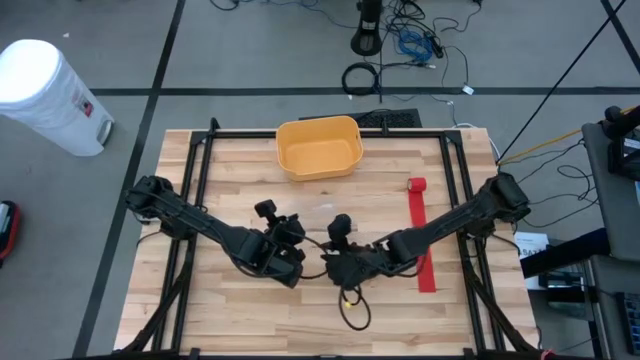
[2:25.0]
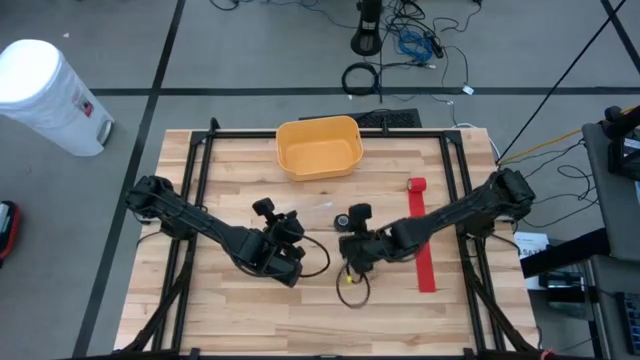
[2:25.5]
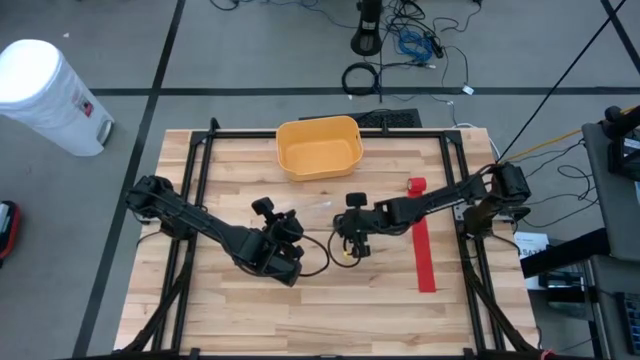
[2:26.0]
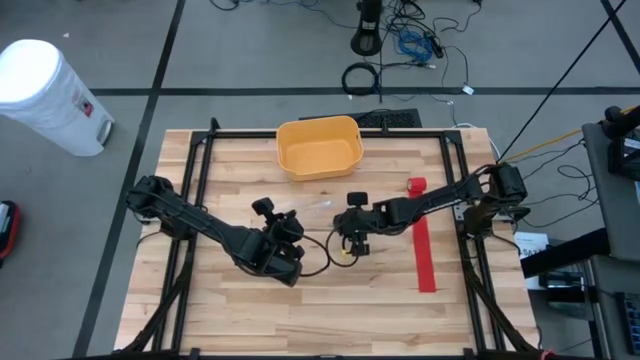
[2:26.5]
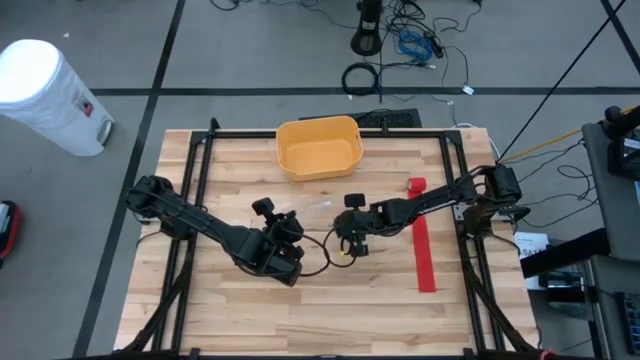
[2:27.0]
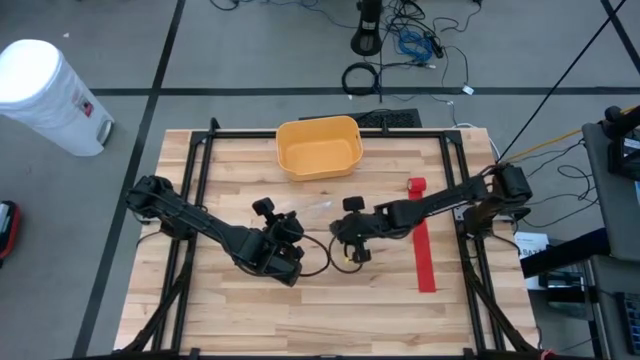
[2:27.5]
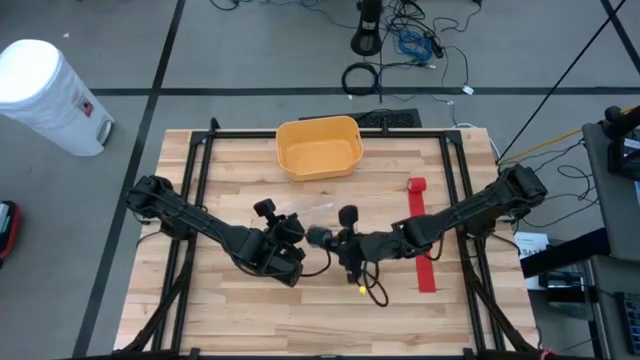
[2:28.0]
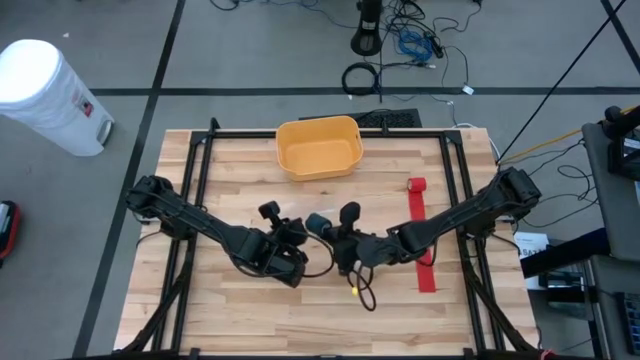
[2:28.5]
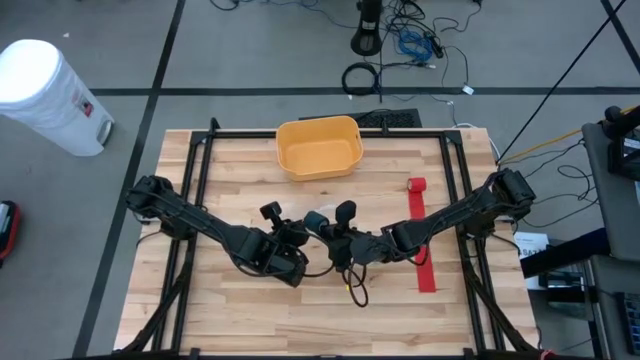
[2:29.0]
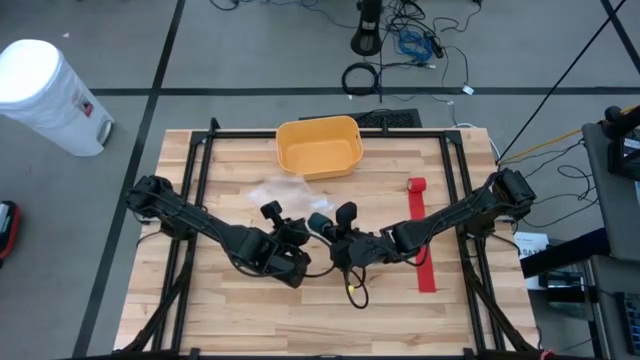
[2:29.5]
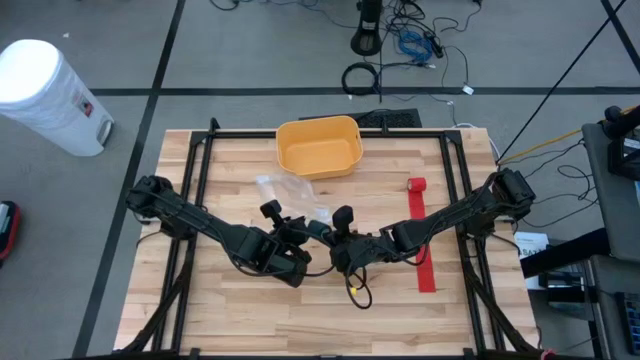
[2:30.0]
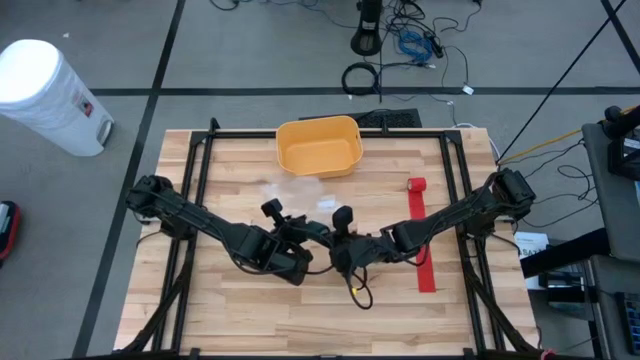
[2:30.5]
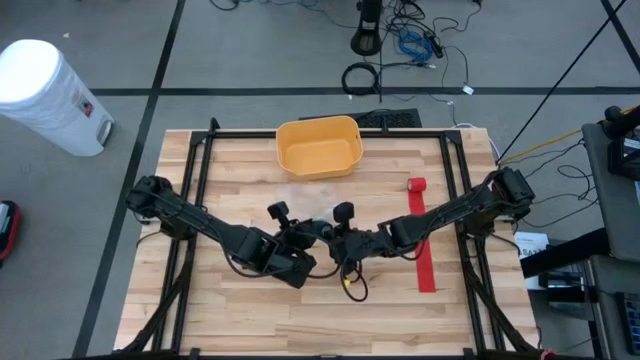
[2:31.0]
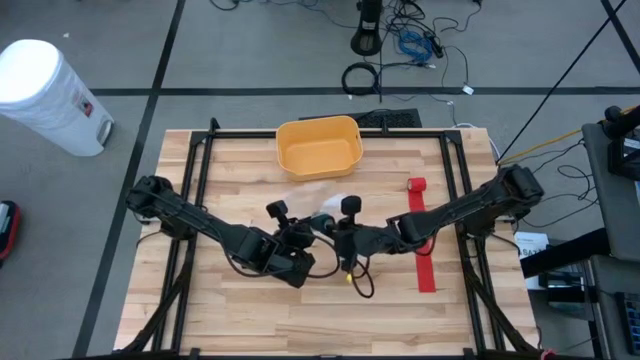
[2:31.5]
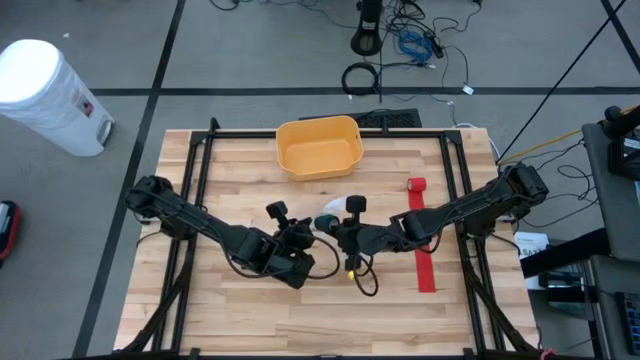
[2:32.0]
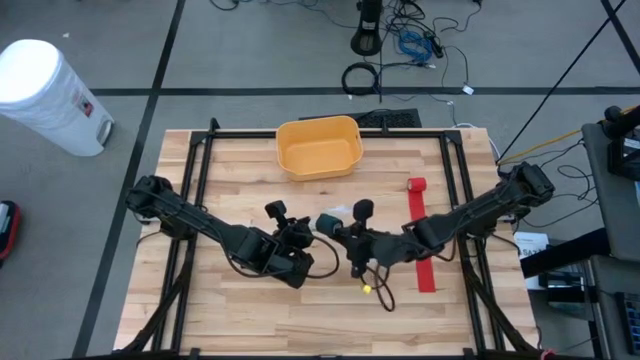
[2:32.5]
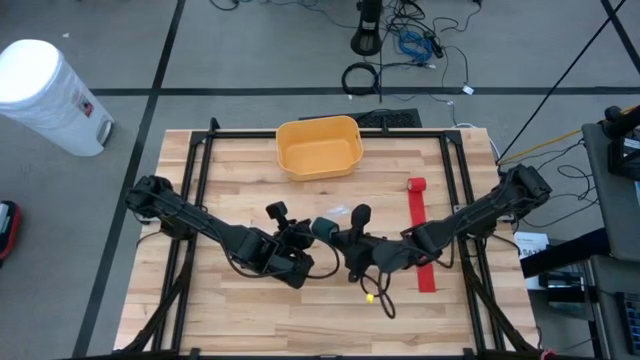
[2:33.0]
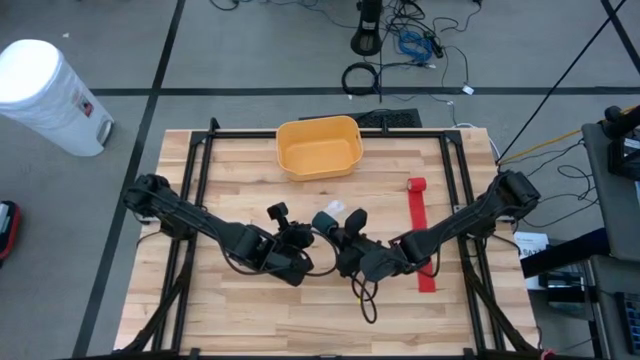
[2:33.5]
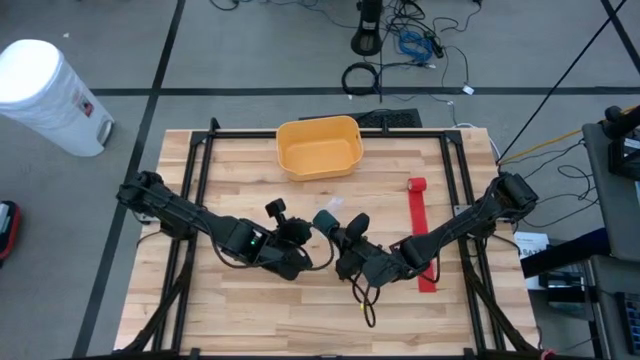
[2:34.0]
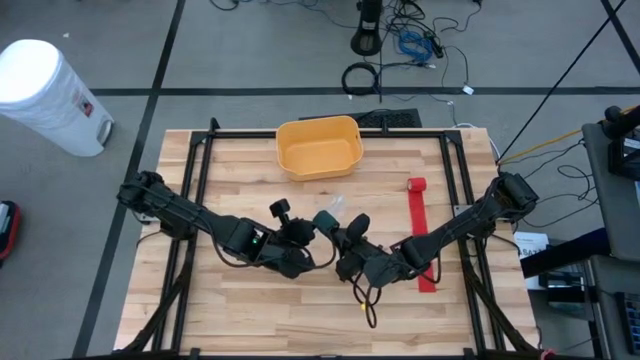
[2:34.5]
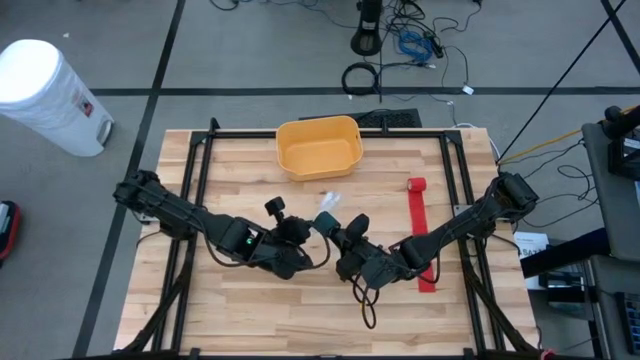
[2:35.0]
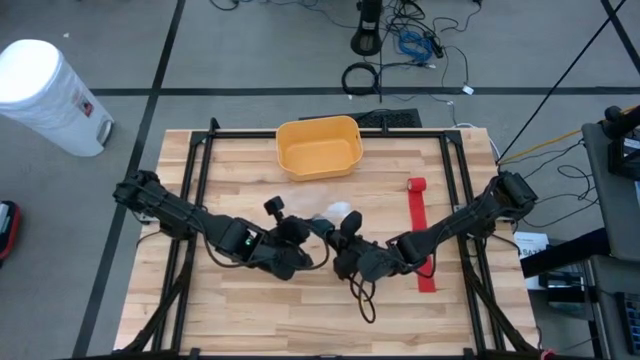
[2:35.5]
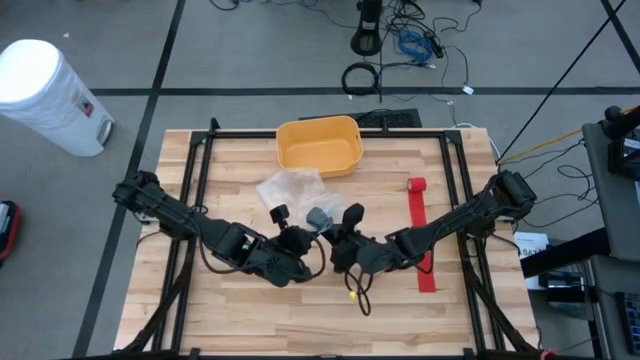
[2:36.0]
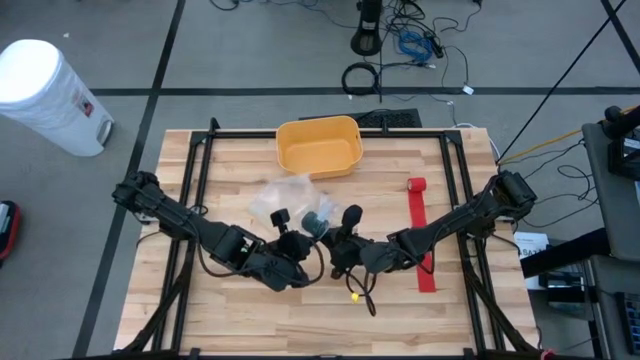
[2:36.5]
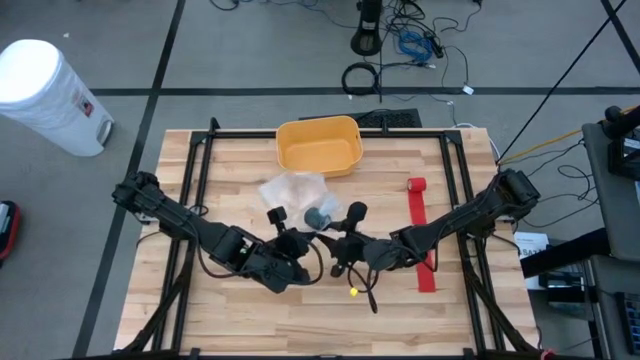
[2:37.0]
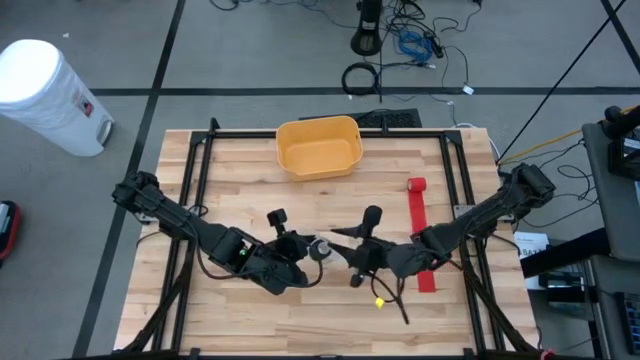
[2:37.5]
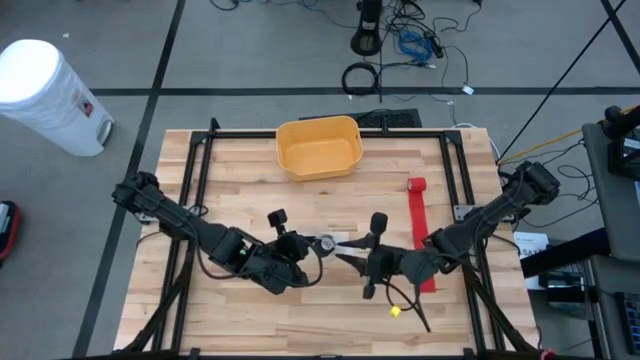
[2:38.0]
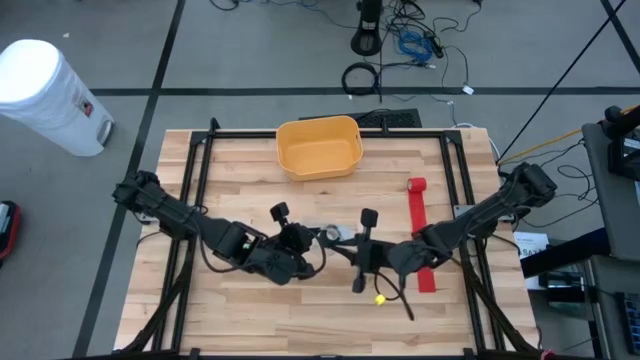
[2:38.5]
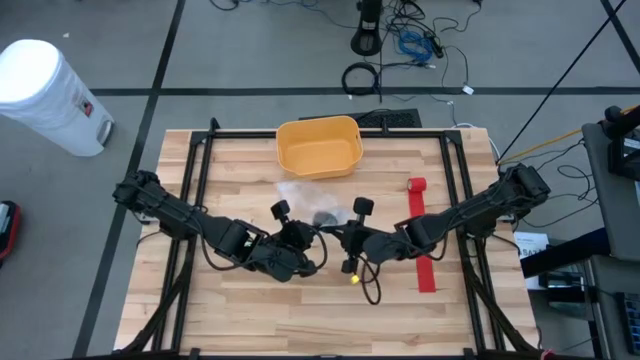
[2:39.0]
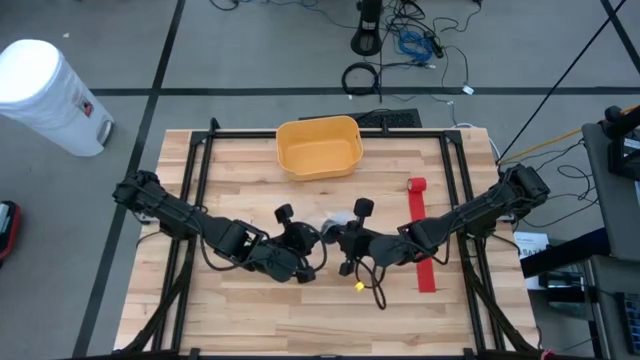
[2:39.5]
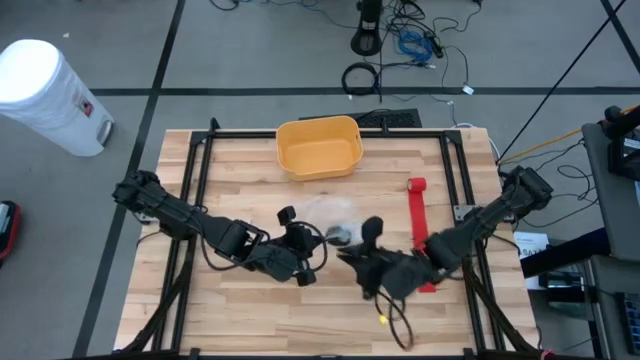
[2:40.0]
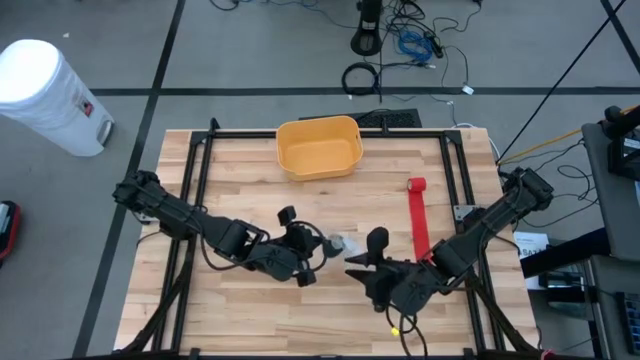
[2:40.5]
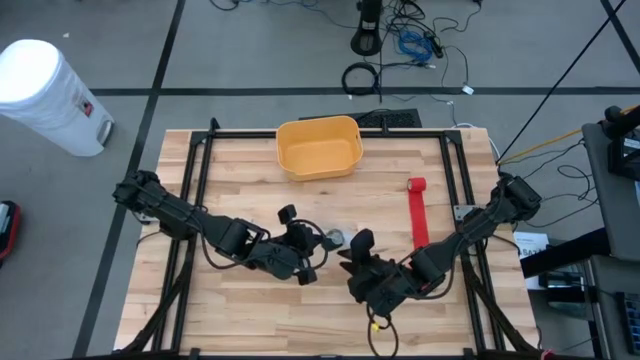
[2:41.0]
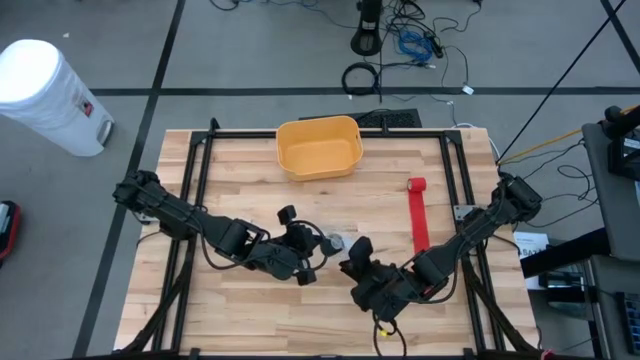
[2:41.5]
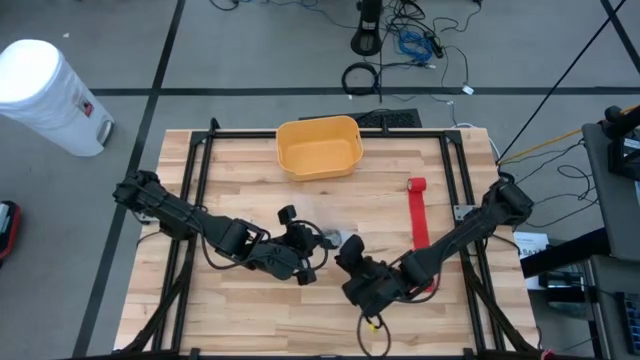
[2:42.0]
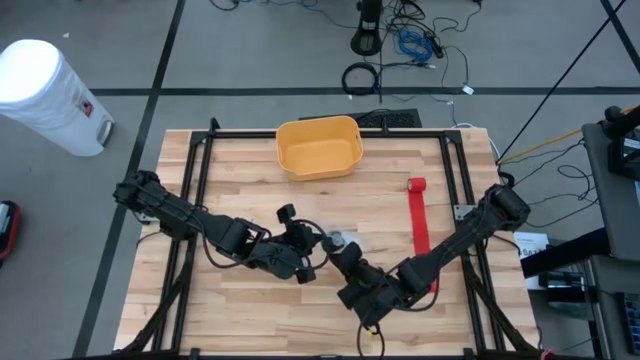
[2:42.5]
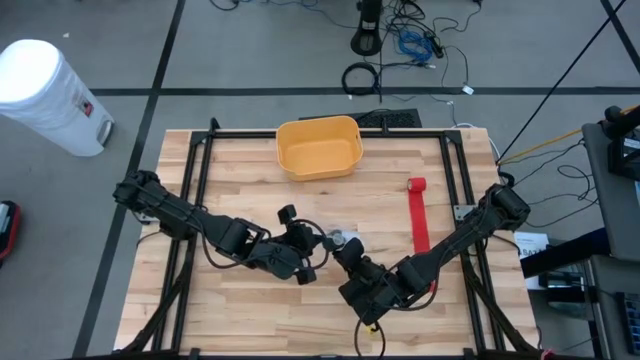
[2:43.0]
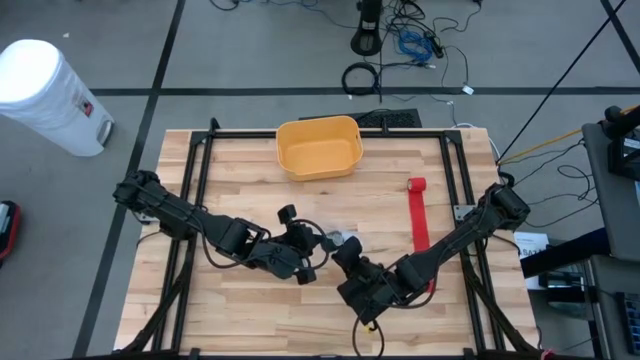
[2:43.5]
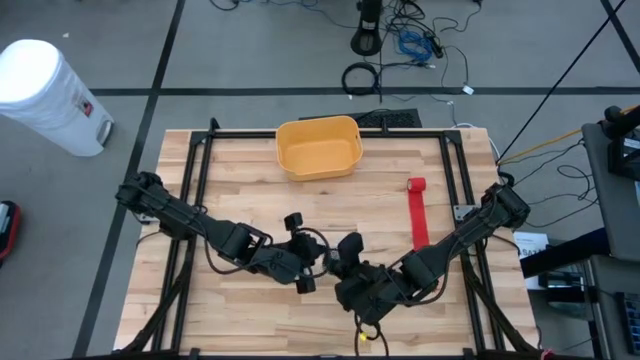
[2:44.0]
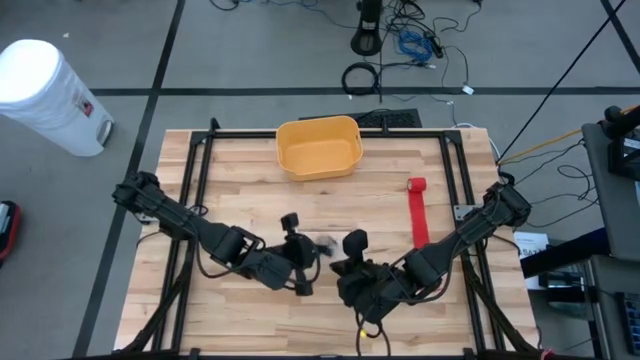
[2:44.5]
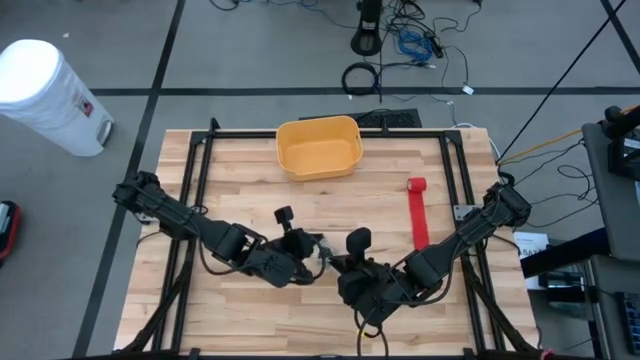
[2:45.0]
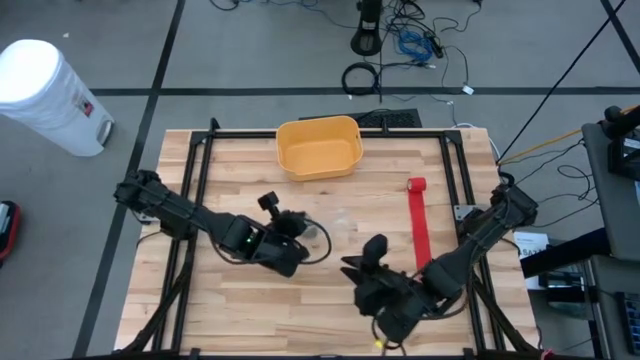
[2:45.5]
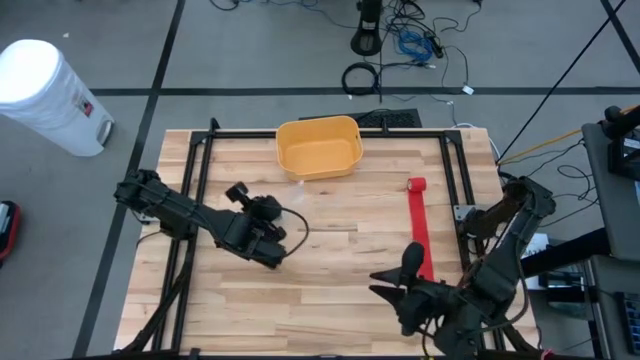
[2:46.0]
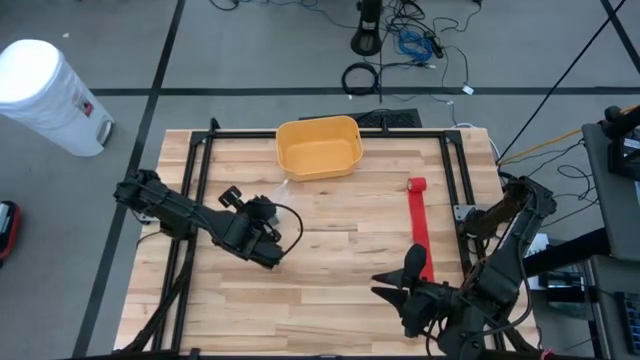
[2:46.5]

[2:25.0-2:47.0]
Task: Roll bandage
Put the rolled green bandage into the transparent zip bag
